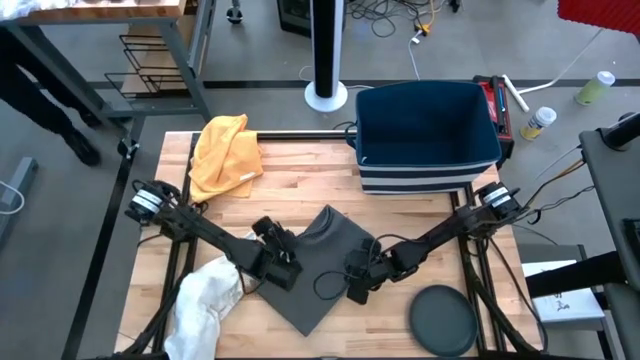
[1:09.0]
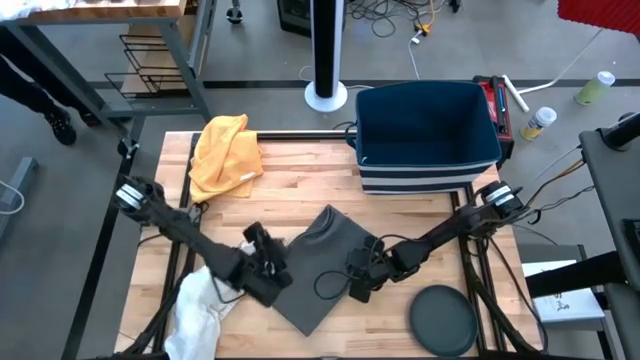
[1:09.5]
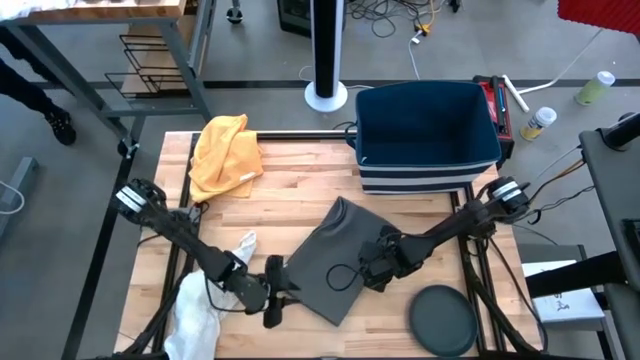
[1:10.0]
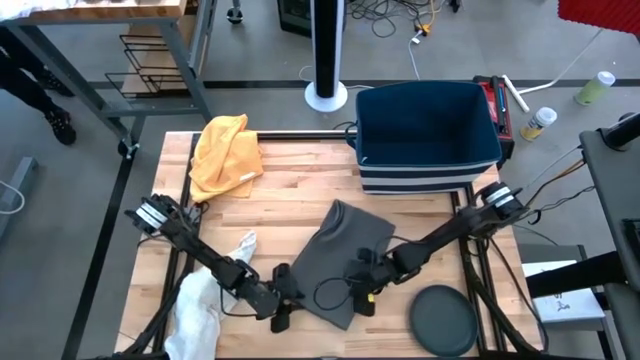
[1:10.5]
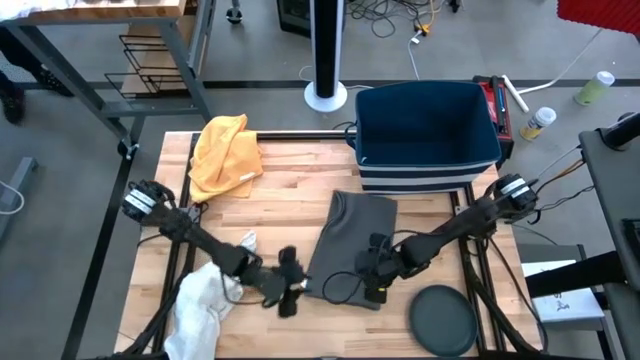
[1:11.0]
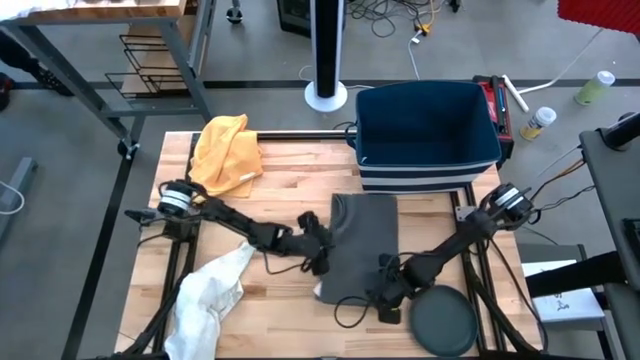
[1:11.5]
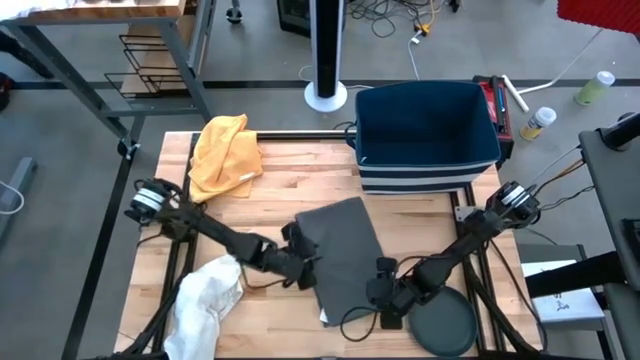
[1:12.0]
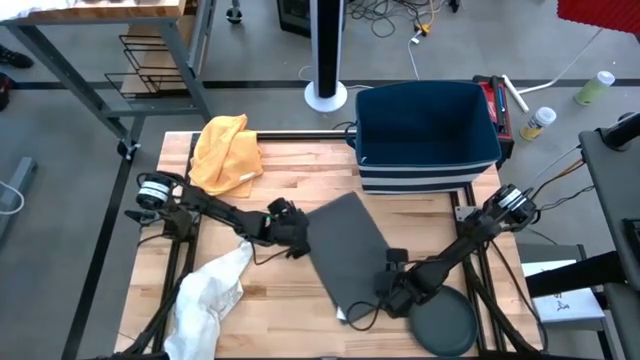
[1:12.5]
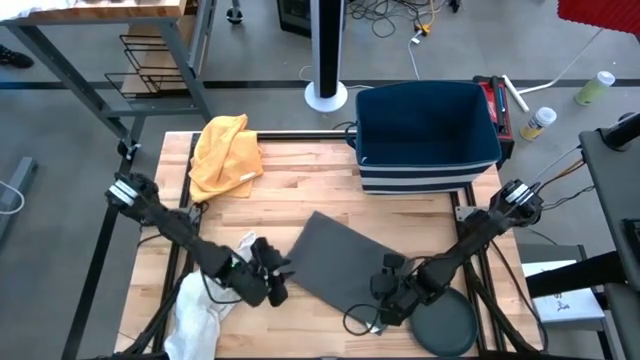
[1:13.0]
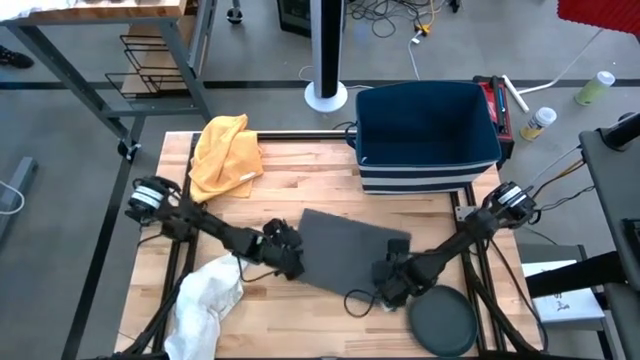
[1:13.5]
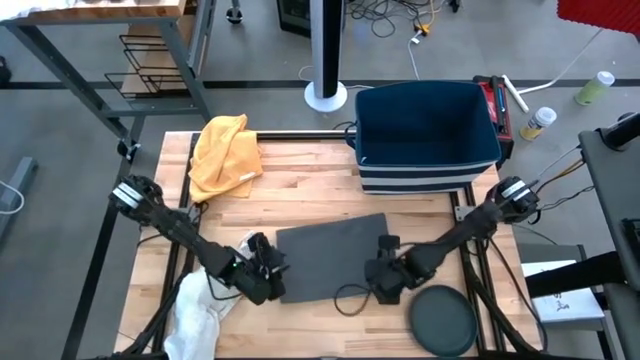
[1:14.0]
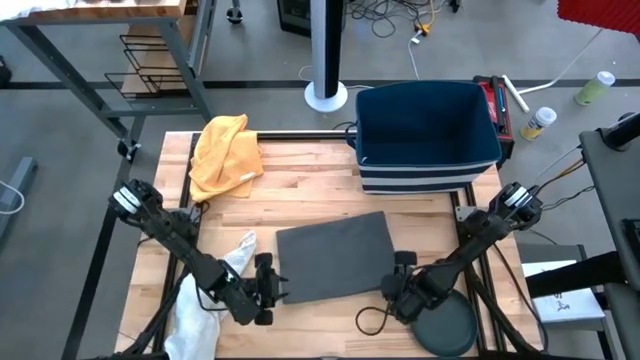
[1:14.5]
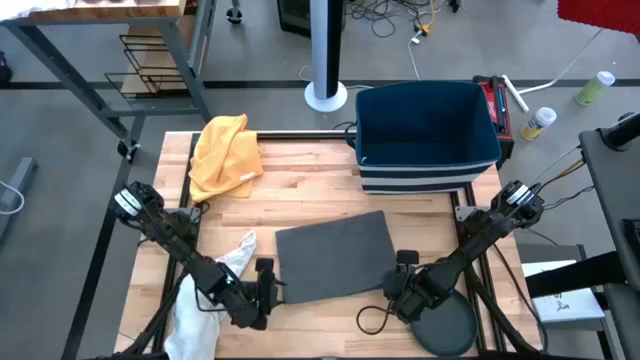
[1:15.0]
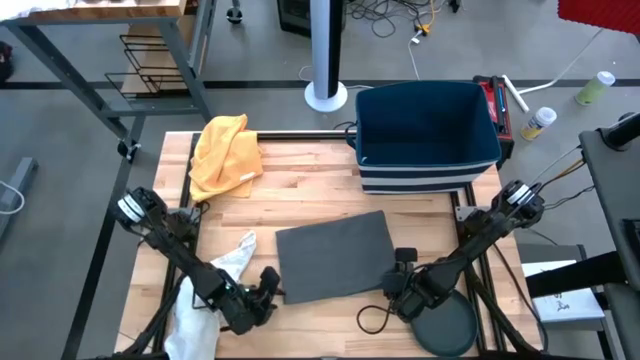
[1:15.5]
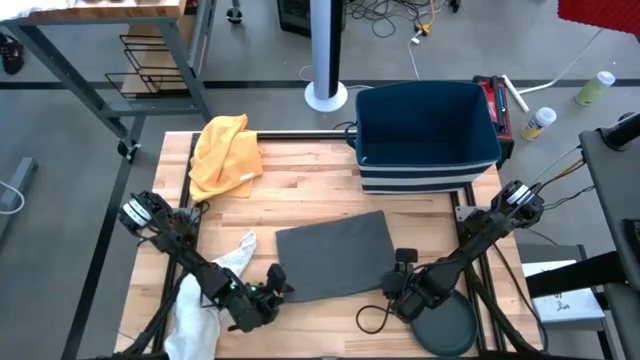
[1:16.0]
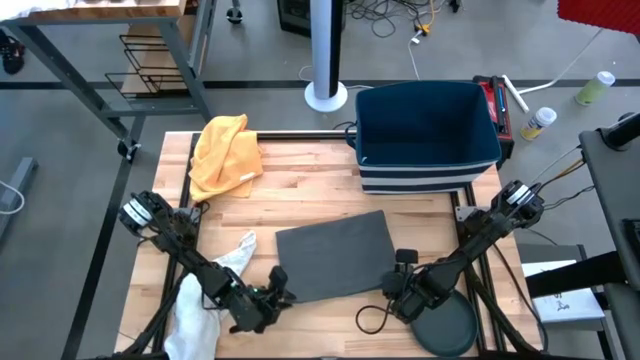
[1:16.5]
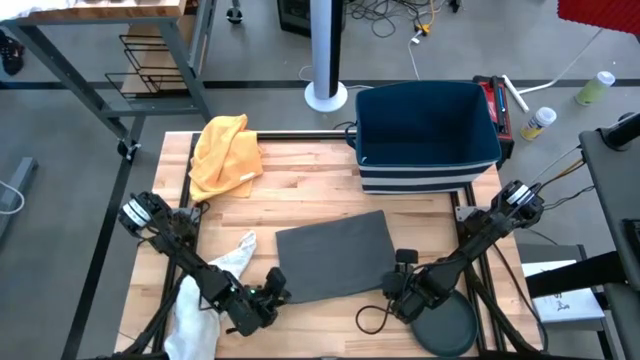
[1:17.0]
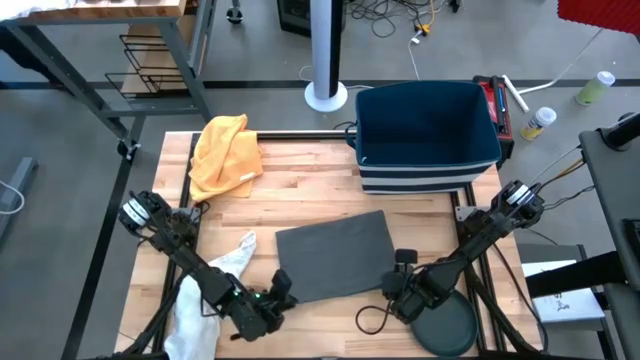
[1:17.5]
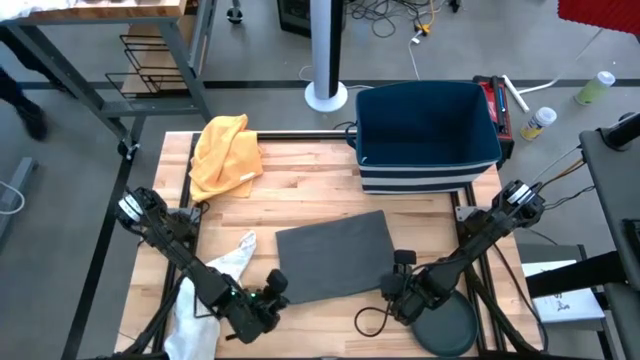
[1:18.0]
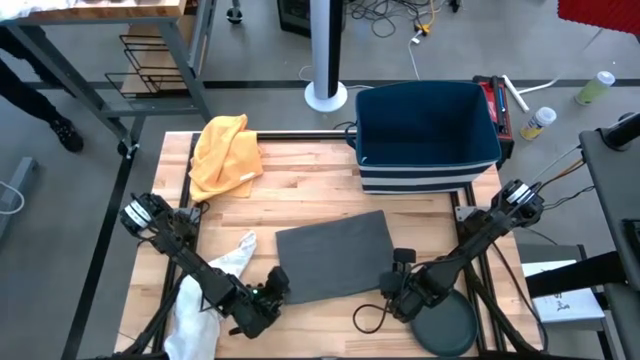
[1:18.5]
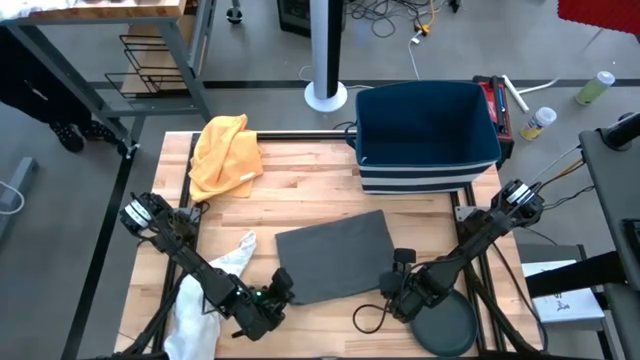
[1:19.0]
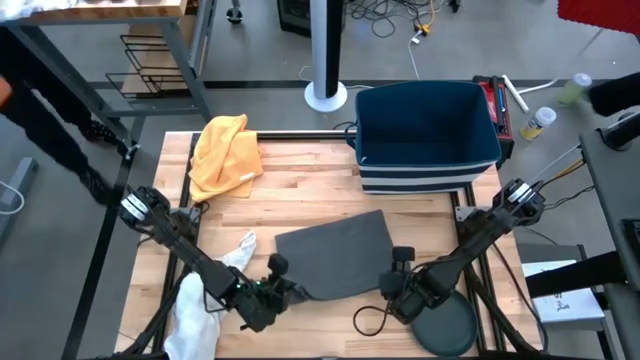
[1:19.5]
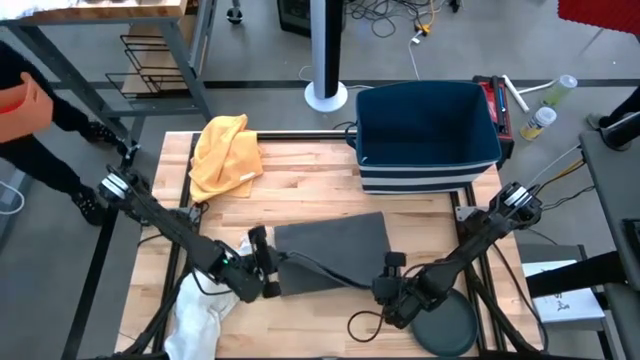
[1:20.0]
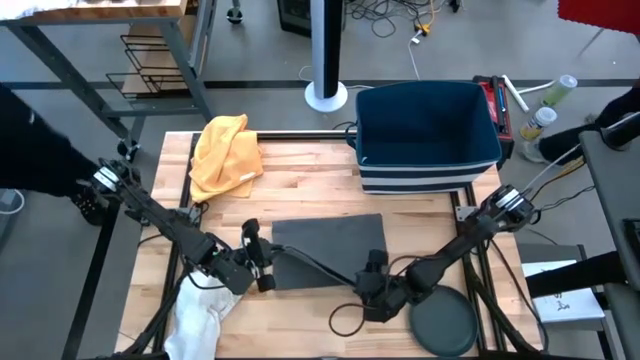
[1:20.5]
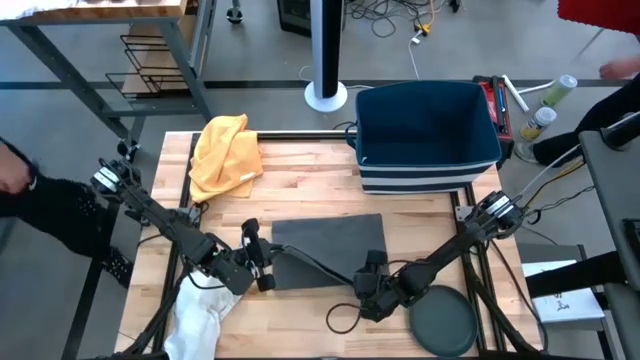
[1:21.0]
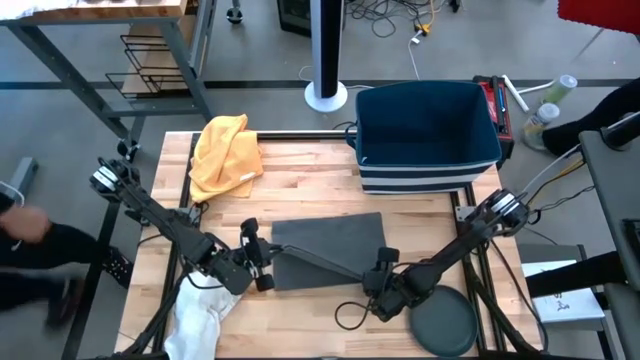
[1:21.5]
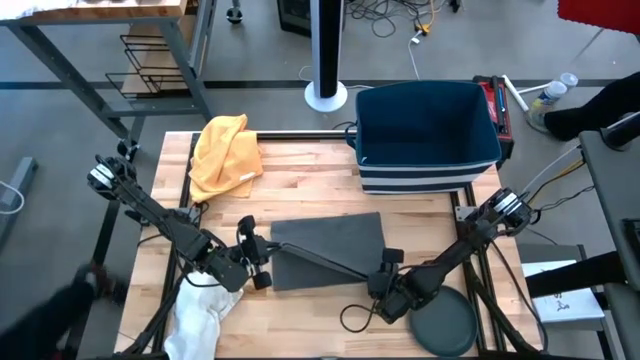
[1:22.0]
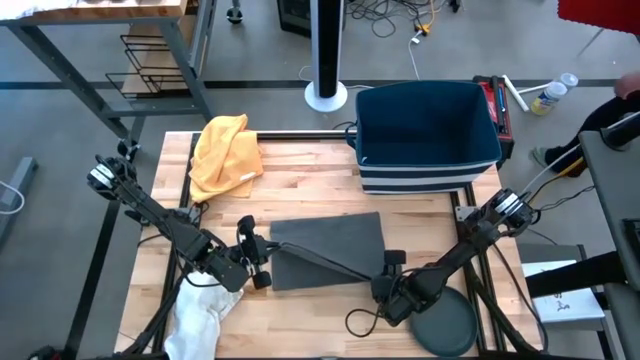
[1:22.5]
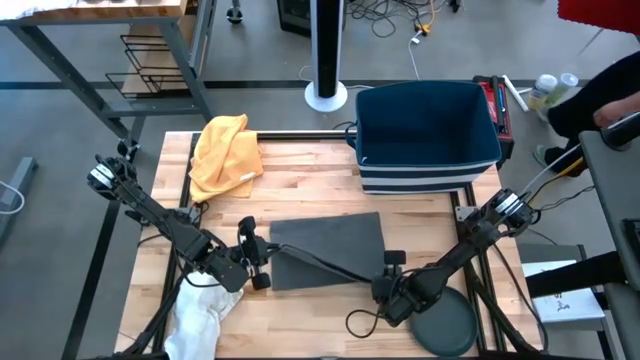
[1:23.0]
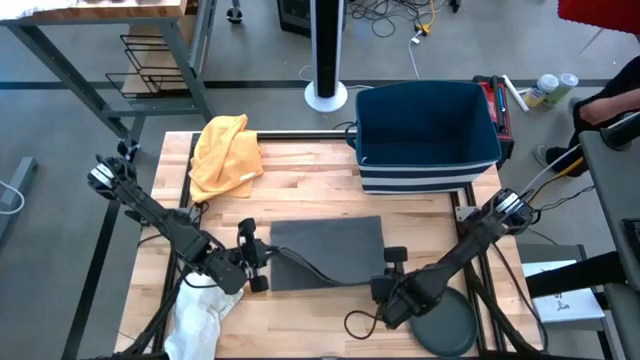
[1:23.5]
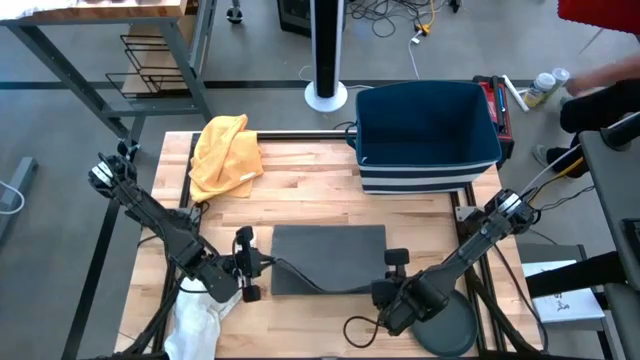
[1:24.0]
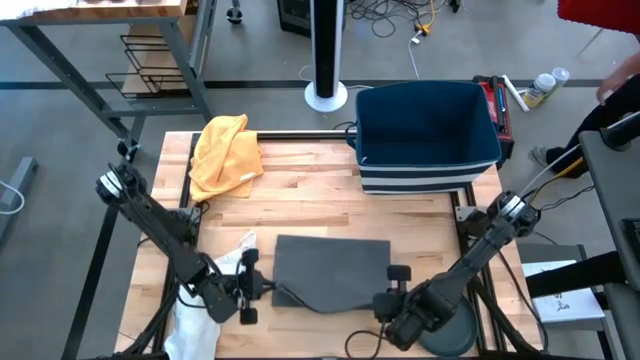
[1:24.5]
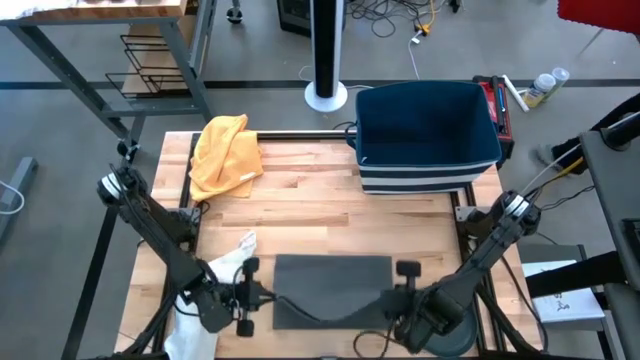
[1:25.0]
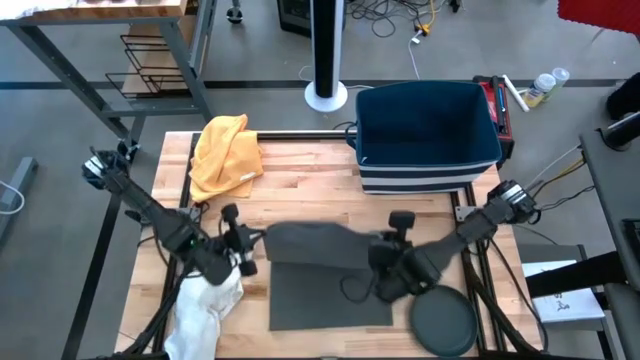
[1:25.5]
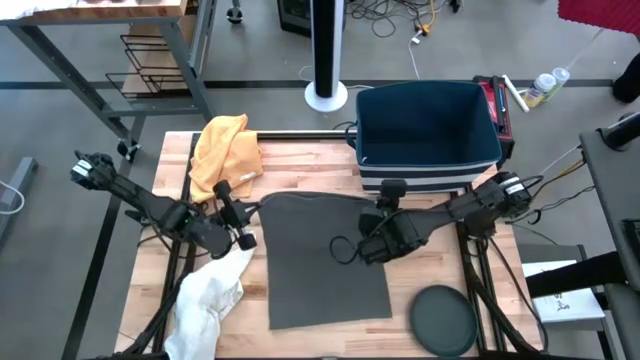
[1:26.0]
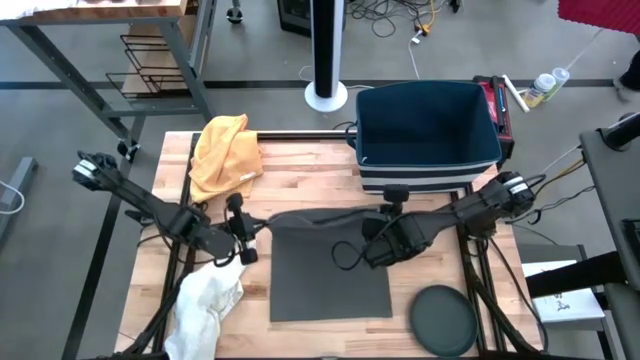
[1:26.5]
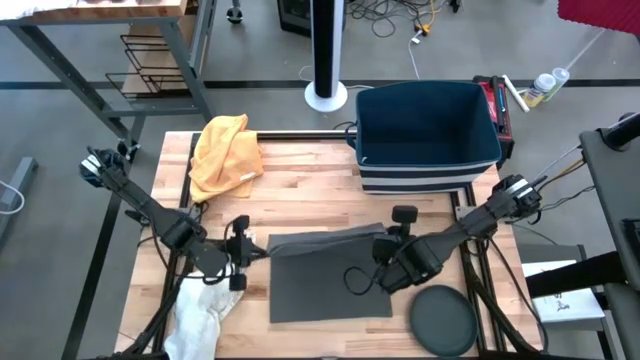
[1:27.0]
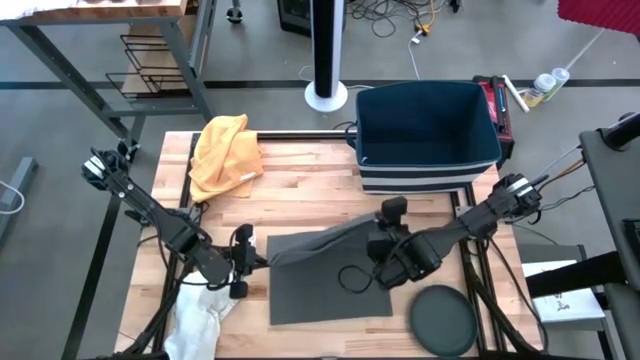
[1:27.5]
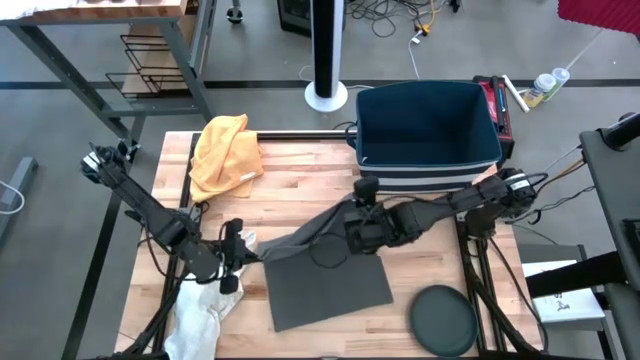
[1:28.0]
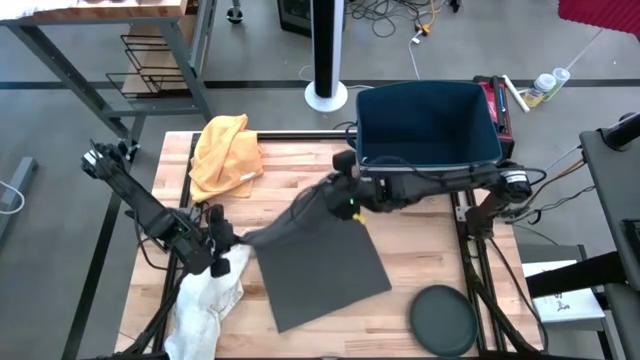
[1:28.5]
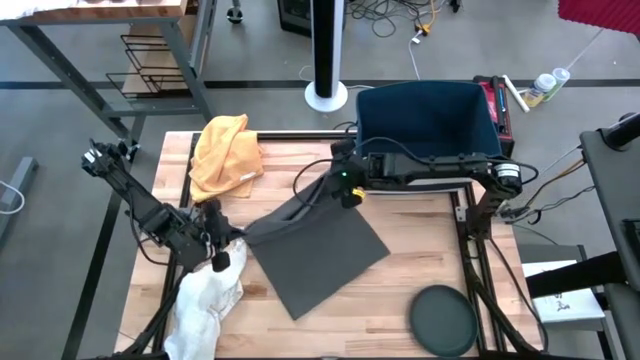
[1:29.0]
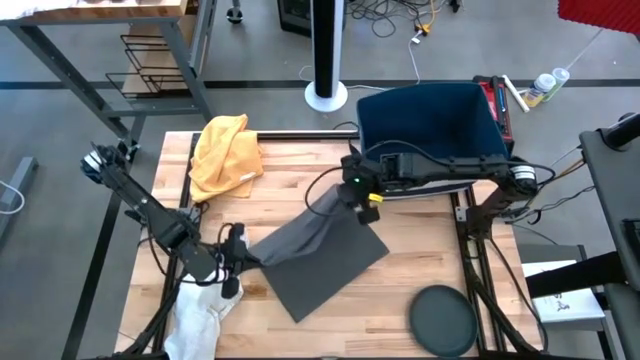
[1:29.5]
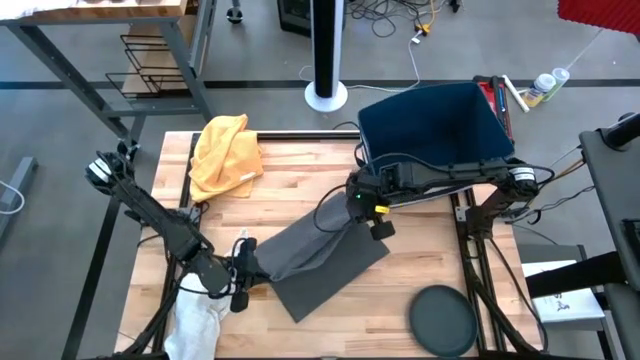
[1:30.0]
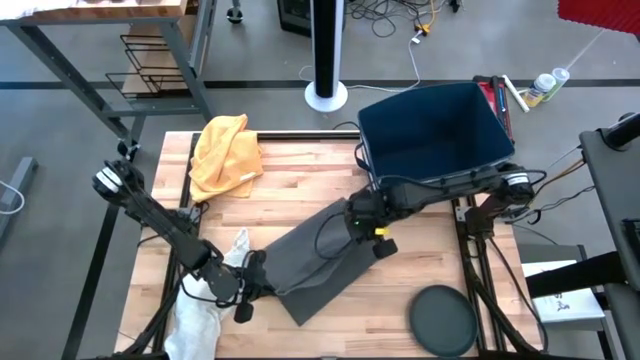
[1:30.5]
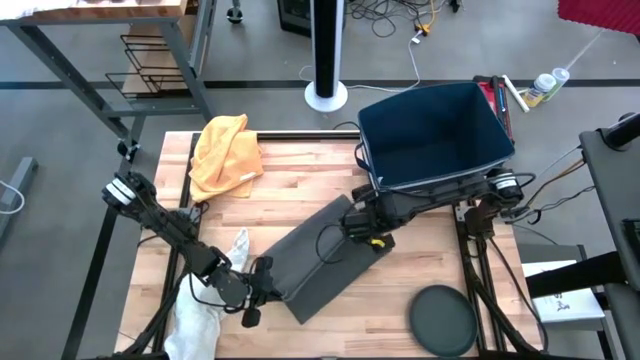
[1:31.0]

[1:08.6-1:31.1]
Task: Fold kitchen towel into neat rectangle
Fold the gray towel
